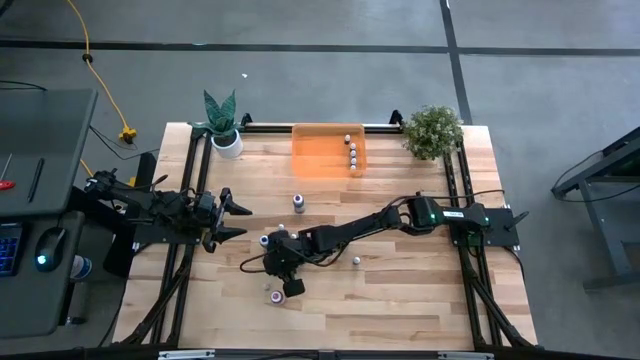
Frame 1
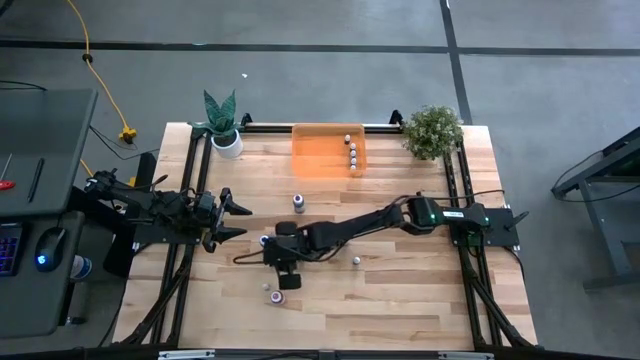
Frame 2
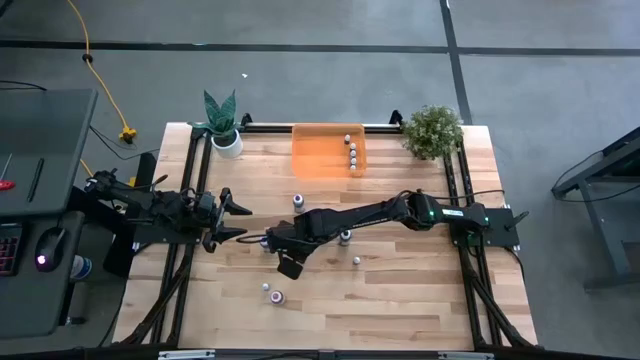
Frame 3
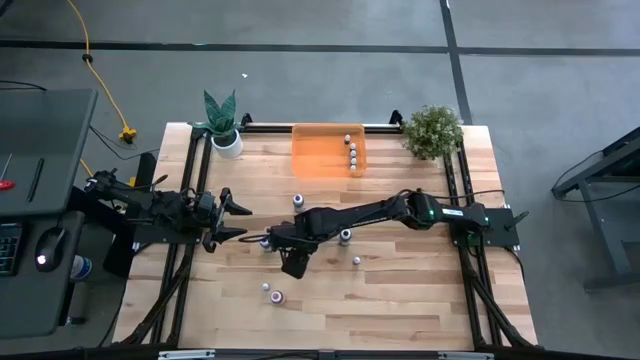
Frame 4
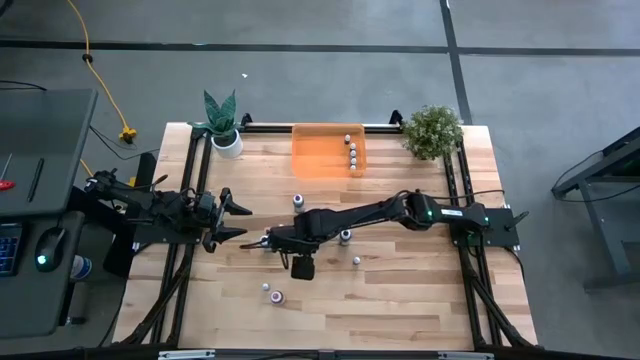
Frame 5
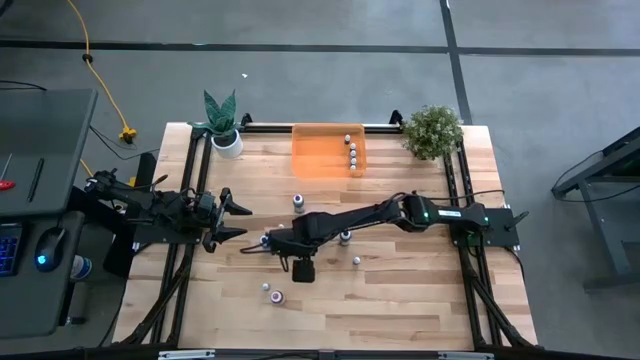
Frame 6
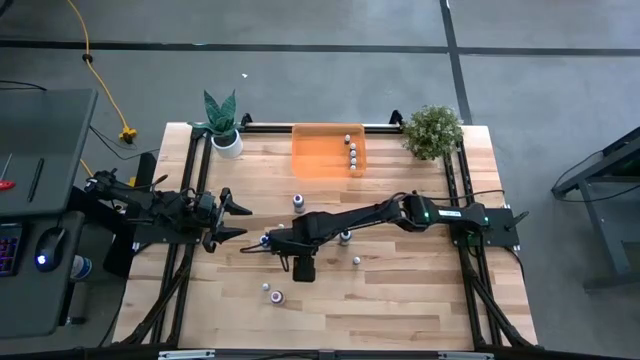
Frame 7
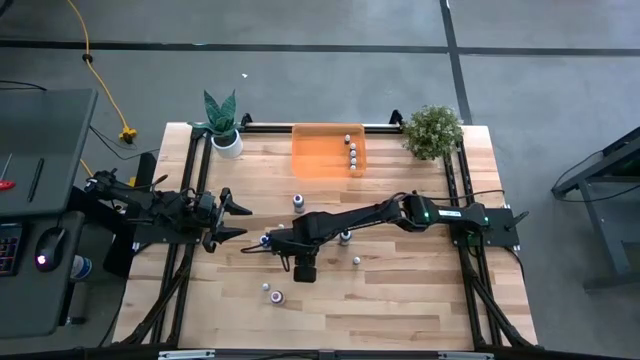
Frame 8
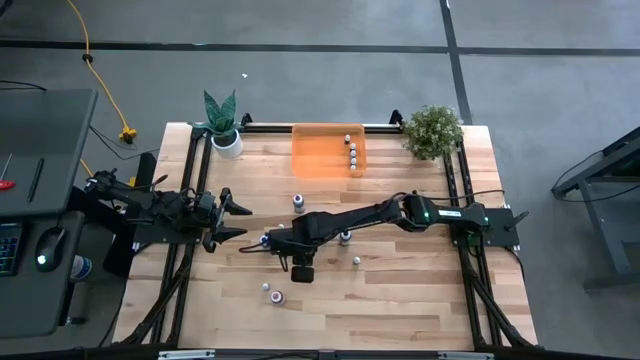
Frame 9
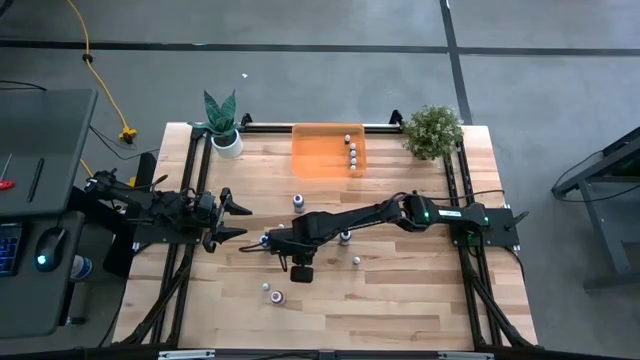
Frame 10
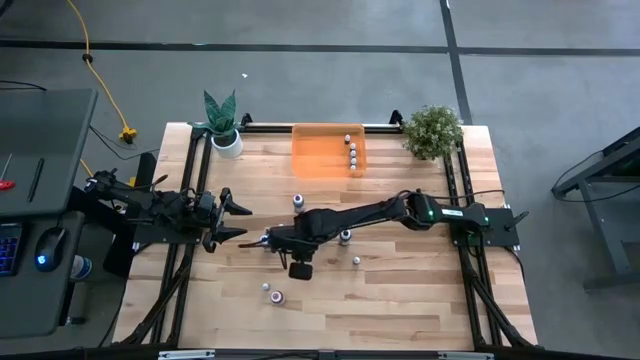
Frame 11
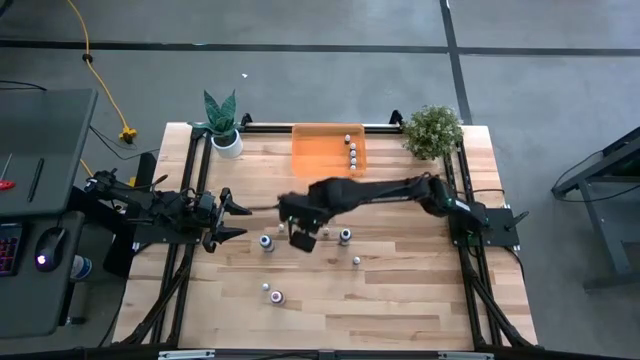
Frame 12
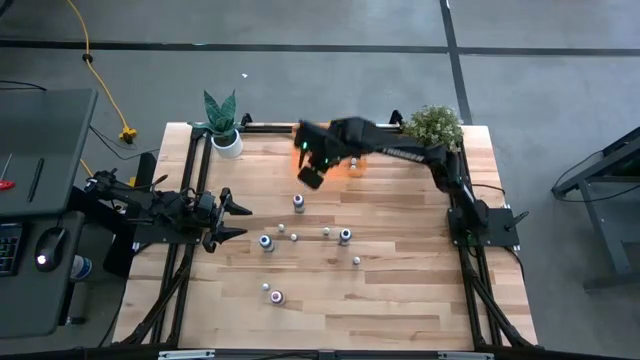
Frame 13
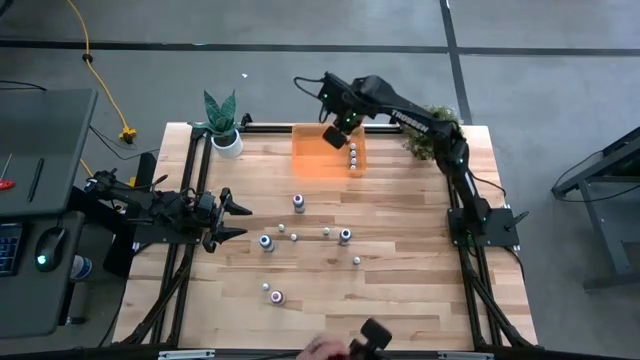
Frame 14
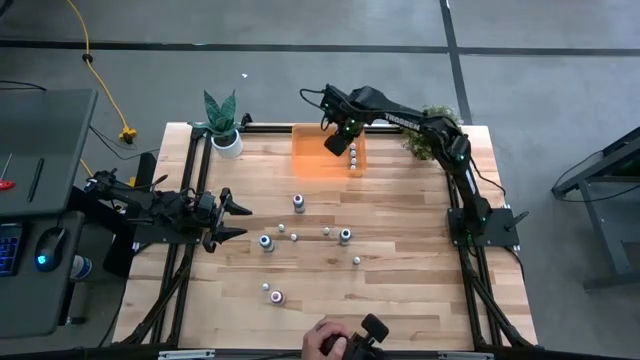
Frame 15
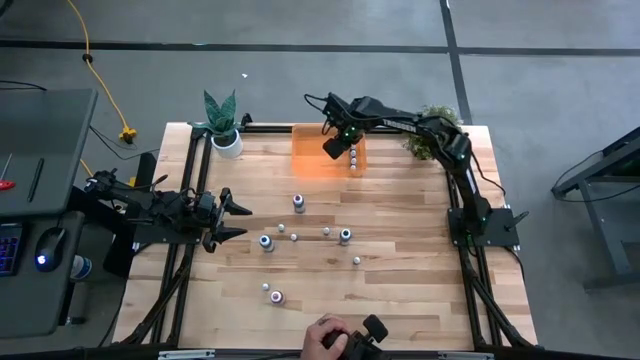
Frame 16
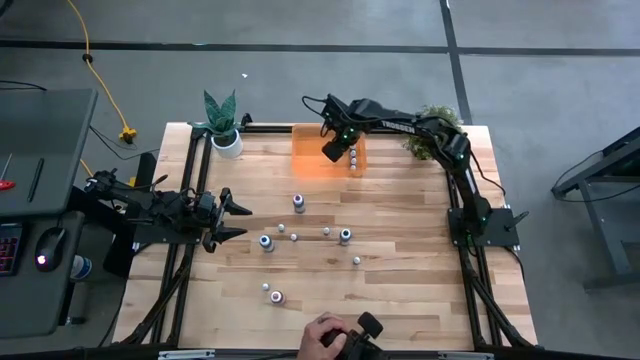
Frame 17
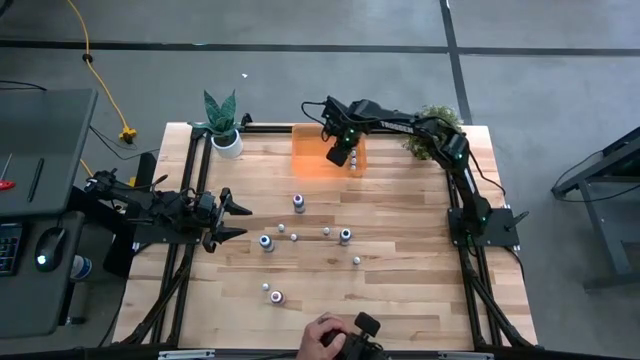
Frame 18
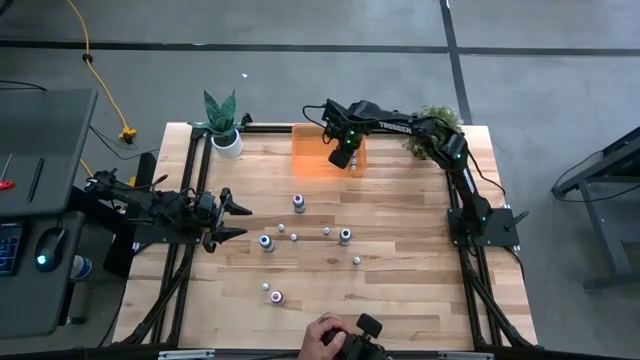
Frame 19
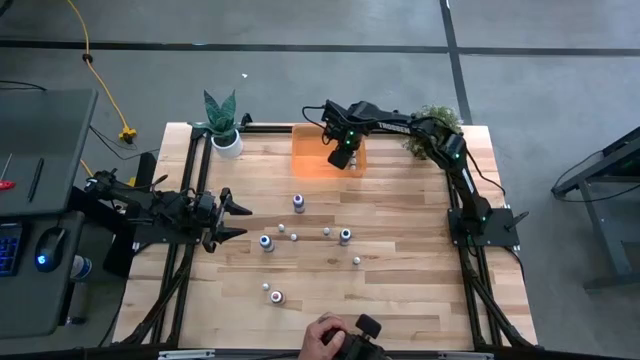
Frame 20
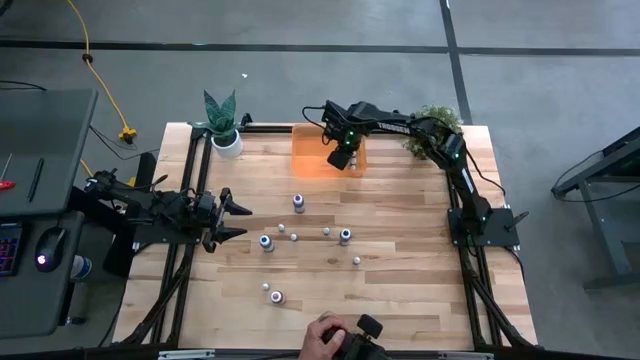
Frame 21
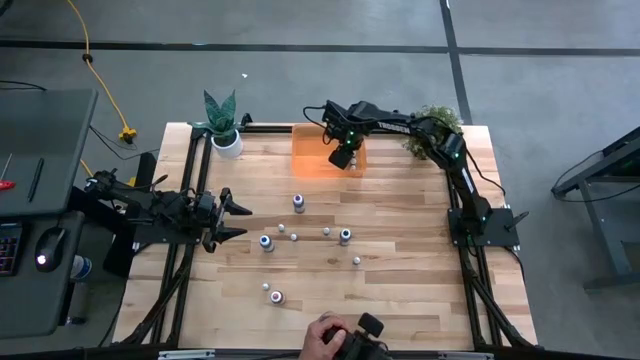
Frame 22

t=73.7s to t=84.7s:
Task: Pick & Place food coloring
Put the small pink food coloring bottle into the orange bin

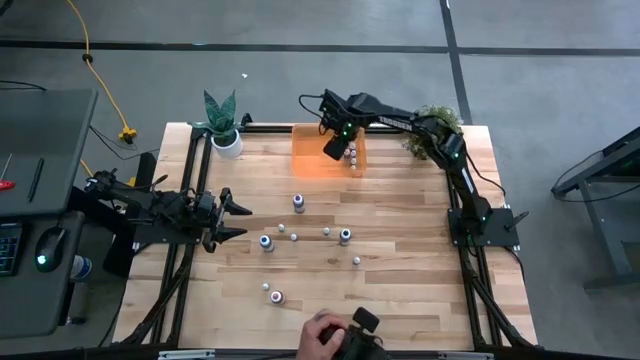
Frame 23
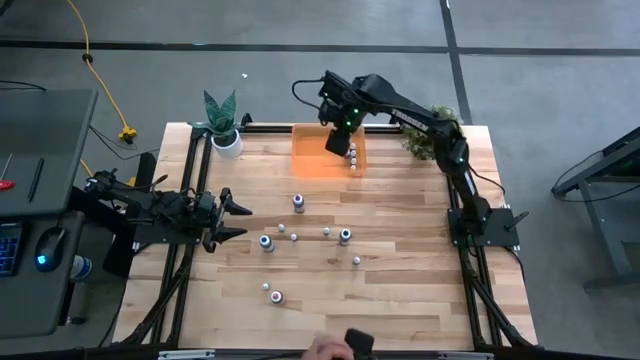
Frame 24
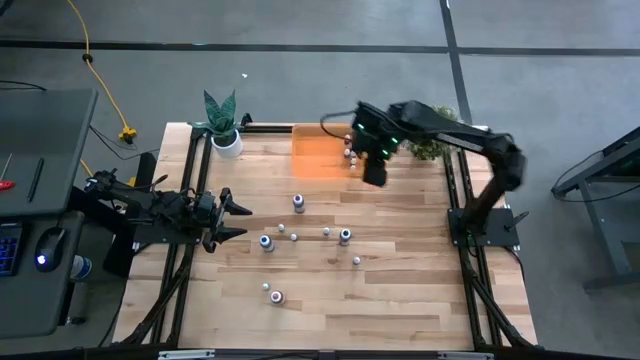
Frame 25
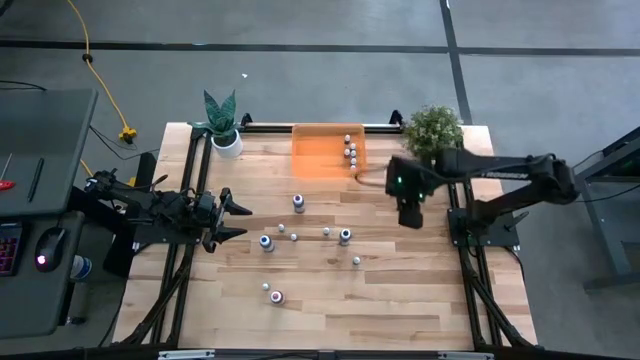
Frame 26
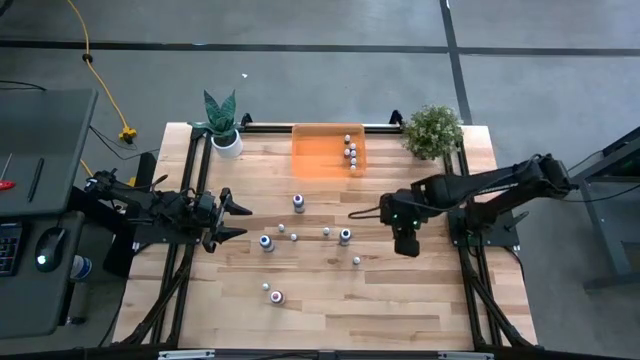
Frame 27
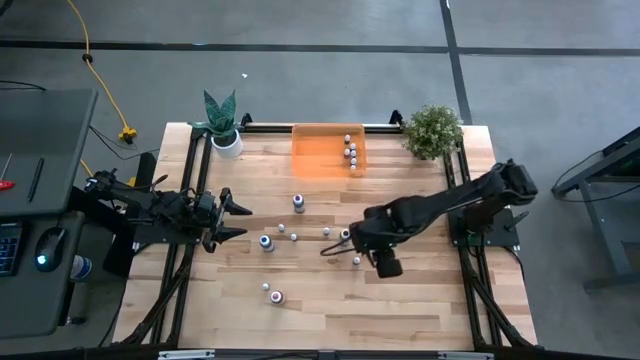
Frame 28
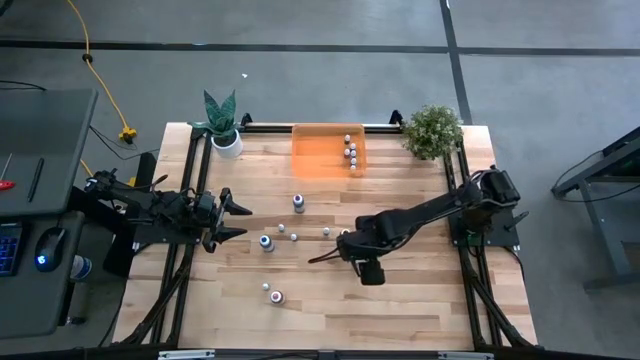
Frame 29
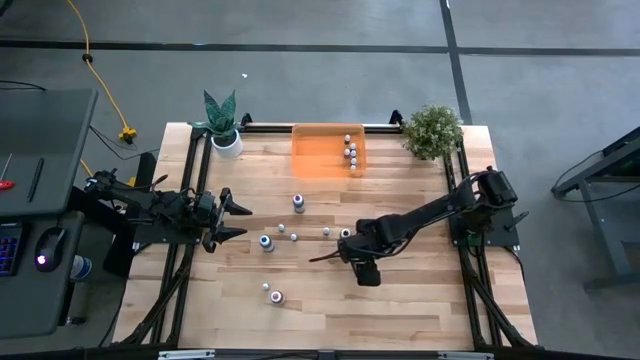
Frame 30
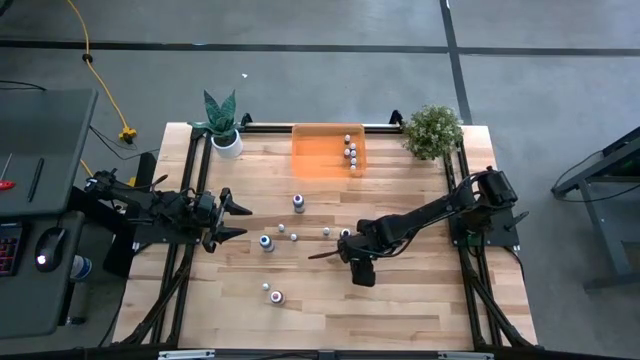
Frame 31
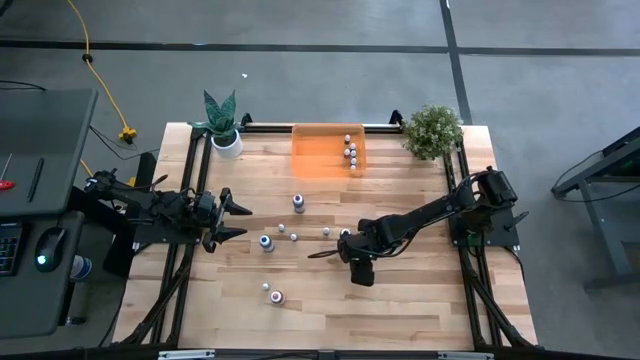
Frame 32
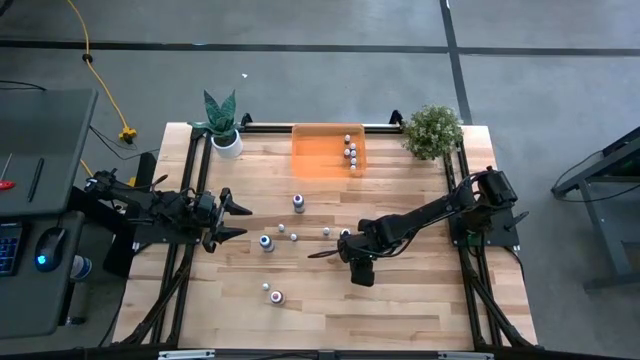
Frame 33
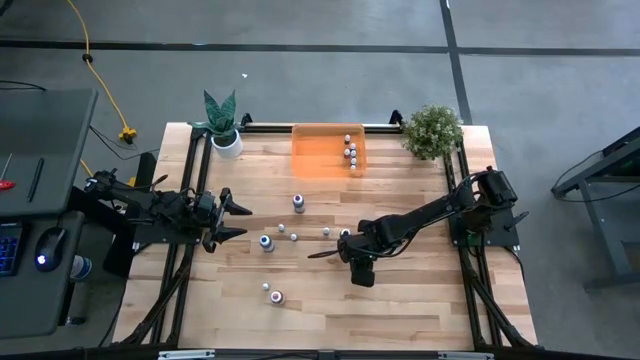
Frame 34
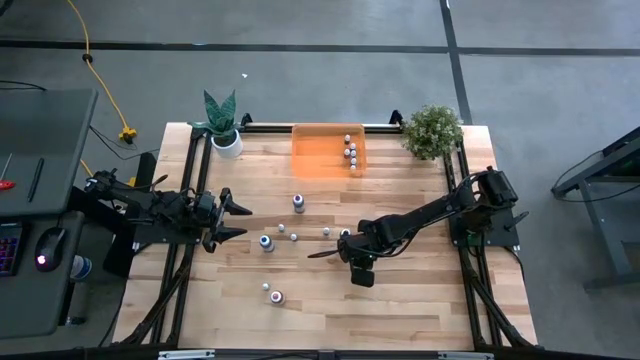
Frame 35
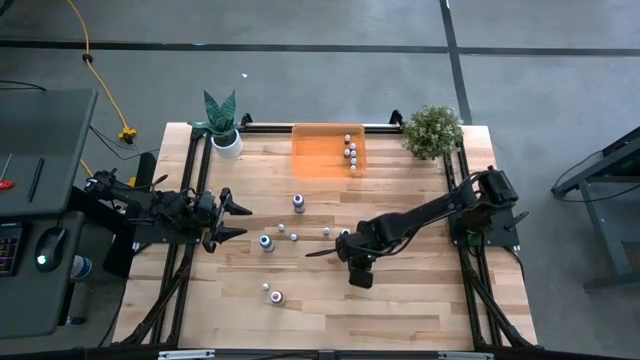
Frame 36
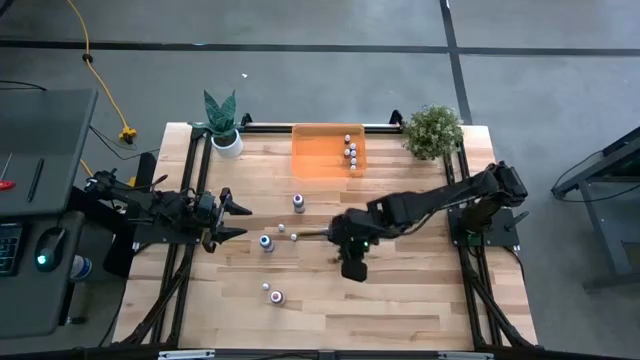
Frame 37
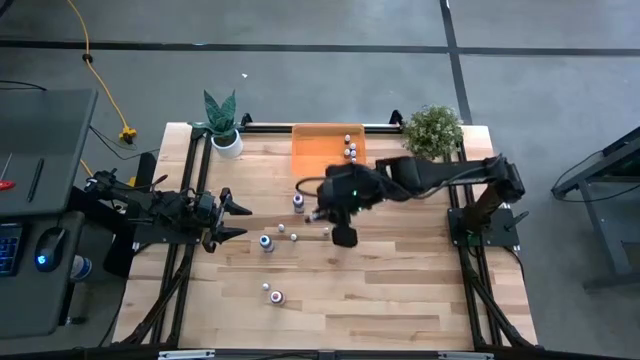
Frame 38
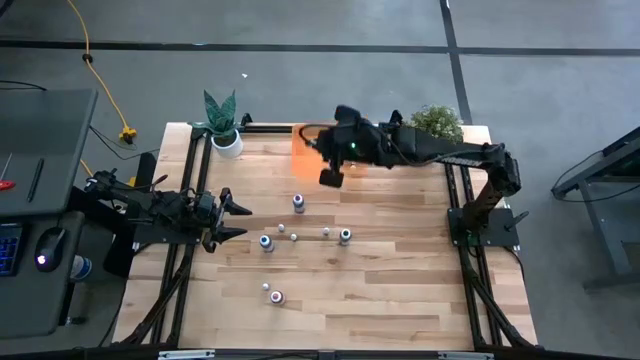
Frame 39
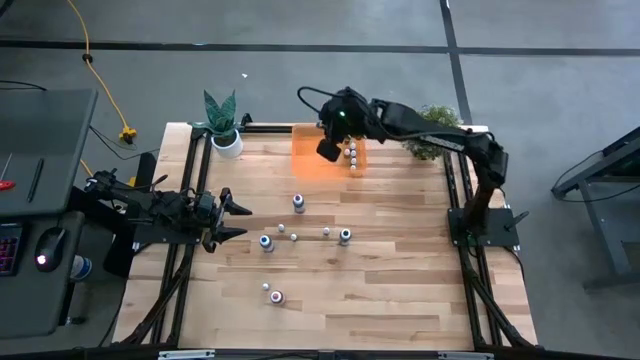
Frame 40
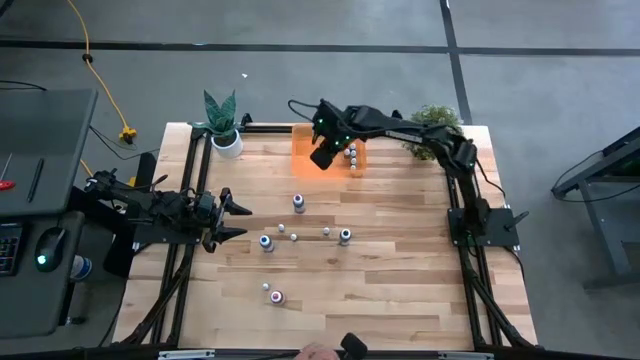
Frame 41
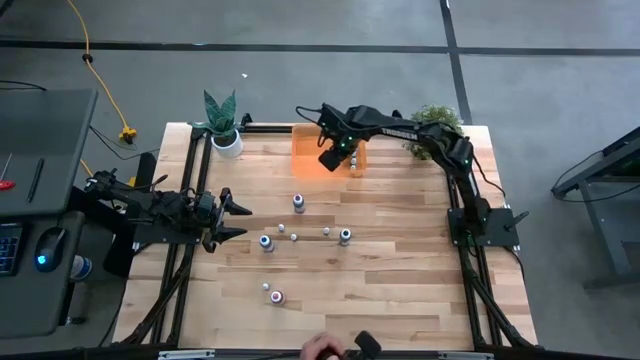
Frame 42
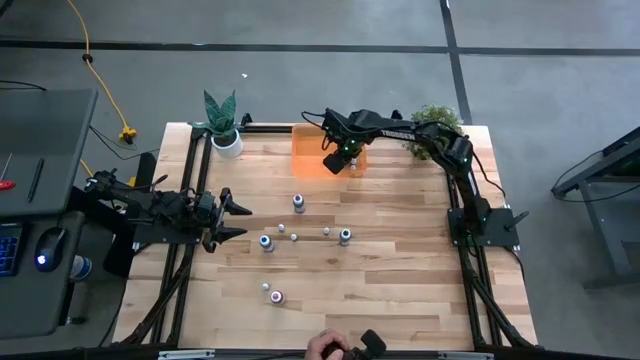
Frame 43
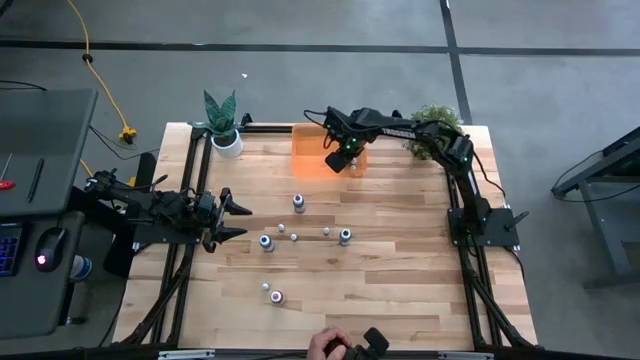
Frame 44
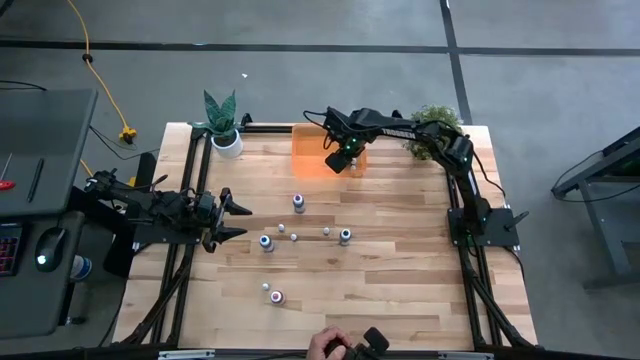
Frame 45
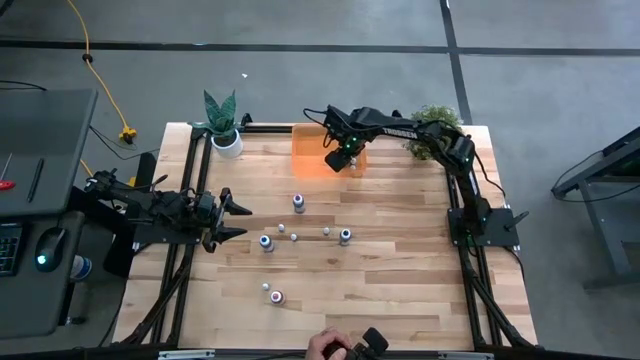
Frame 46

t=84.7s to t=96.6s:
Put the small black food coloring bottle into the orange bin
